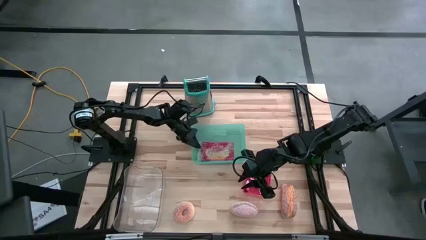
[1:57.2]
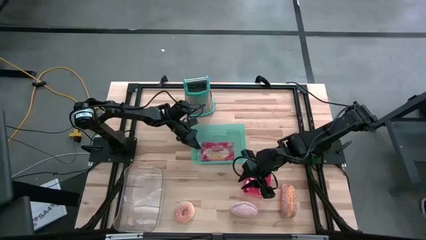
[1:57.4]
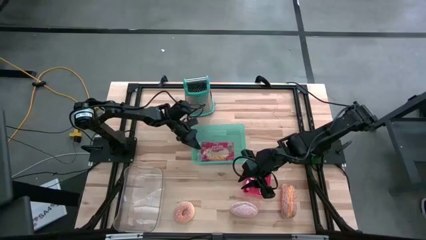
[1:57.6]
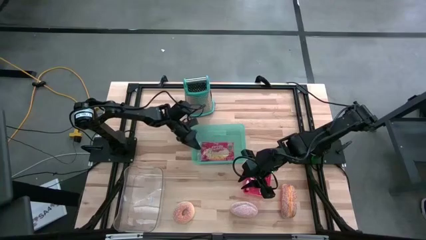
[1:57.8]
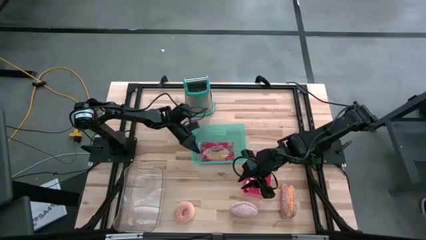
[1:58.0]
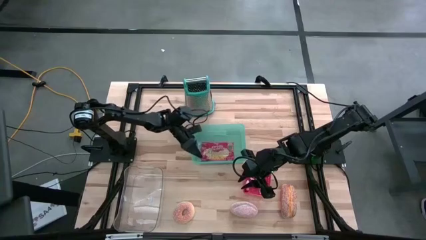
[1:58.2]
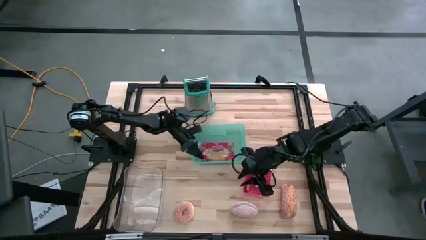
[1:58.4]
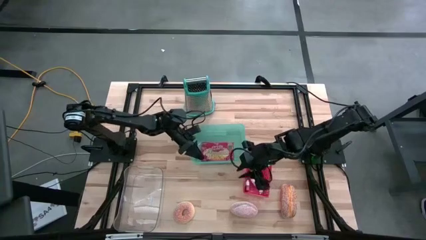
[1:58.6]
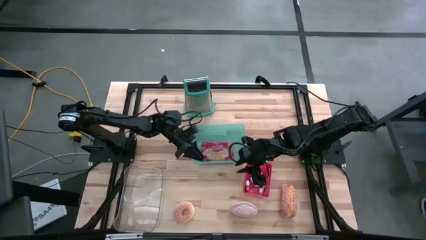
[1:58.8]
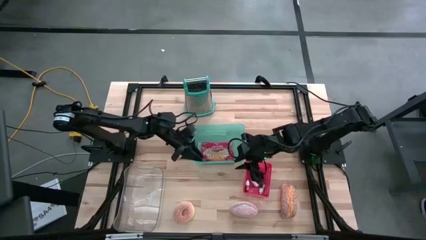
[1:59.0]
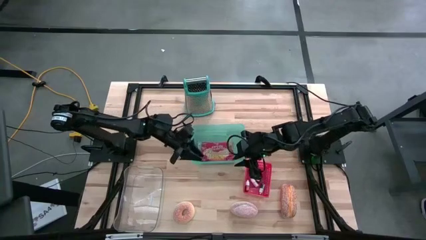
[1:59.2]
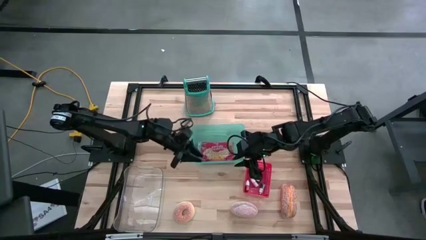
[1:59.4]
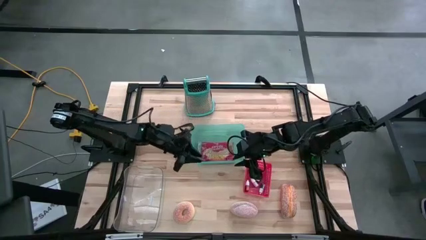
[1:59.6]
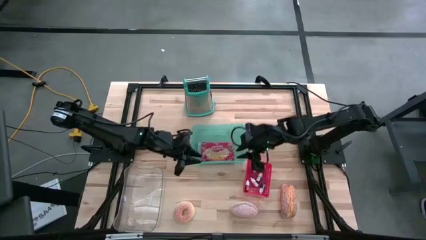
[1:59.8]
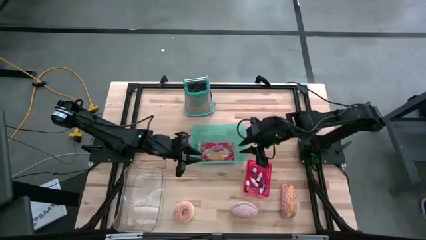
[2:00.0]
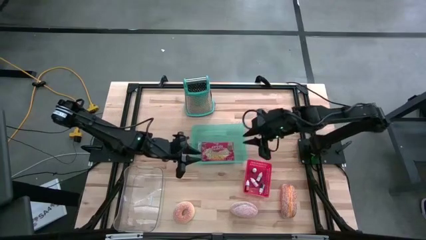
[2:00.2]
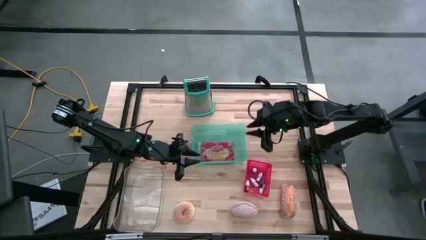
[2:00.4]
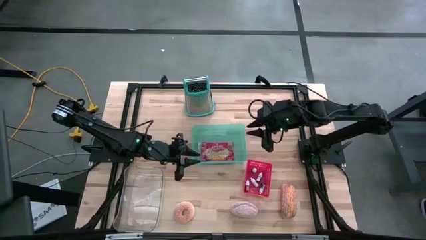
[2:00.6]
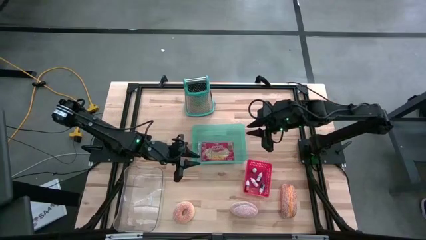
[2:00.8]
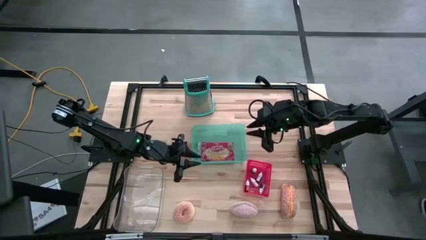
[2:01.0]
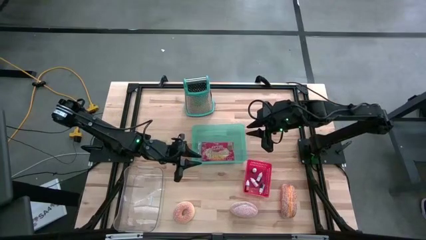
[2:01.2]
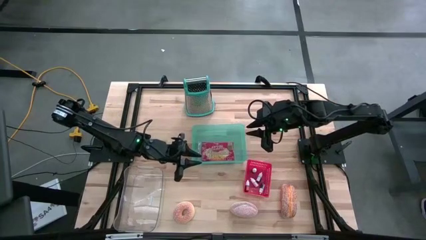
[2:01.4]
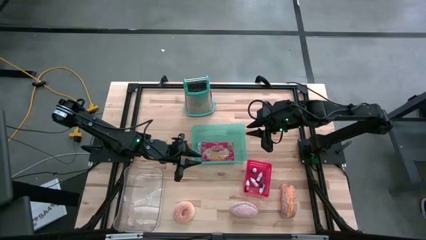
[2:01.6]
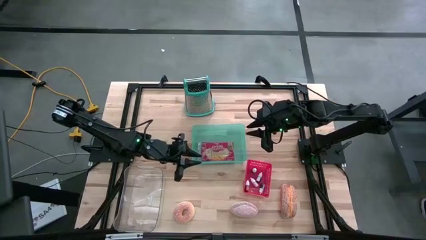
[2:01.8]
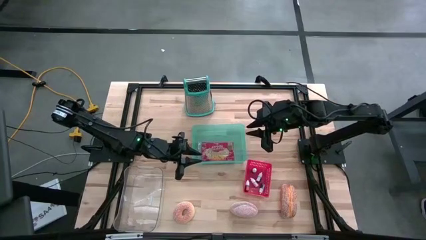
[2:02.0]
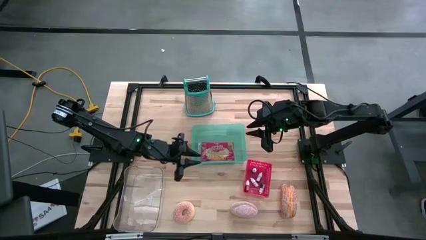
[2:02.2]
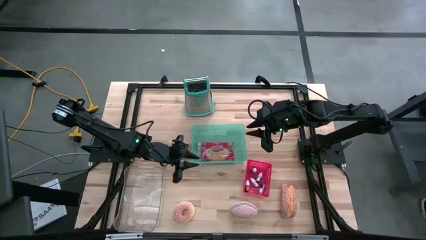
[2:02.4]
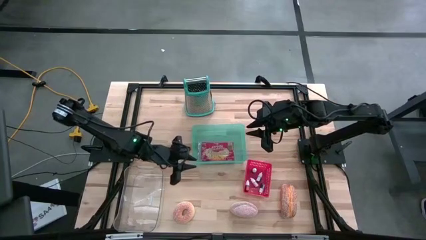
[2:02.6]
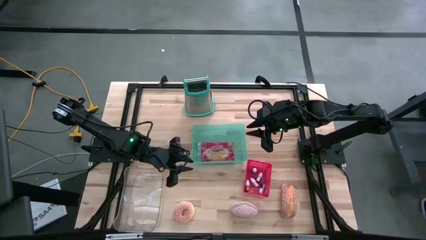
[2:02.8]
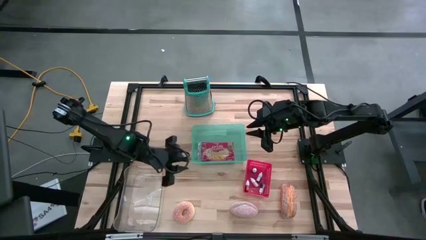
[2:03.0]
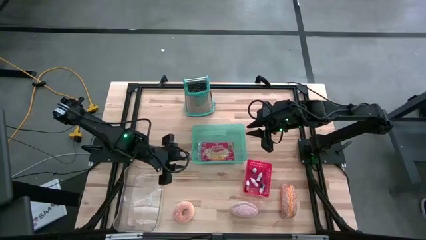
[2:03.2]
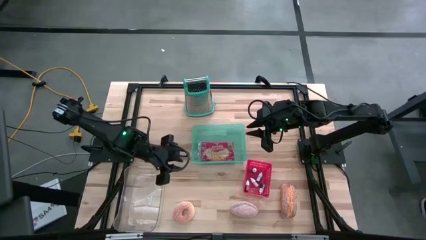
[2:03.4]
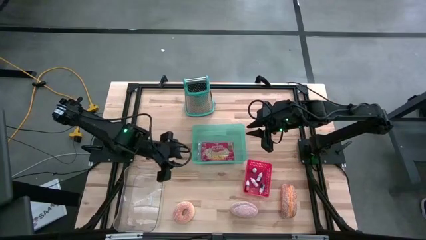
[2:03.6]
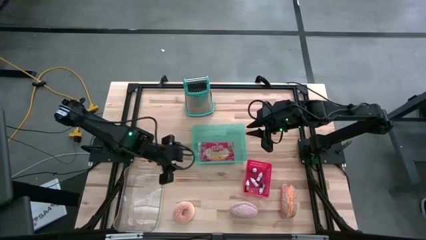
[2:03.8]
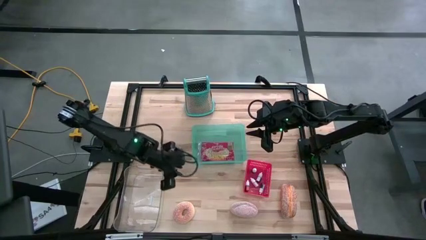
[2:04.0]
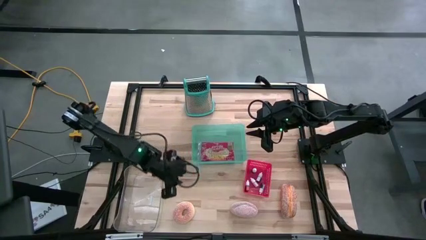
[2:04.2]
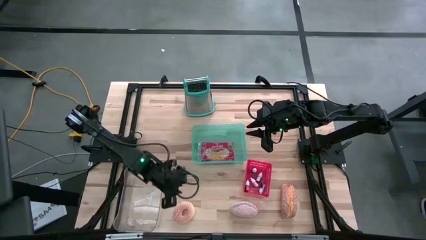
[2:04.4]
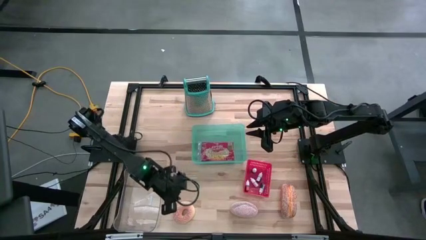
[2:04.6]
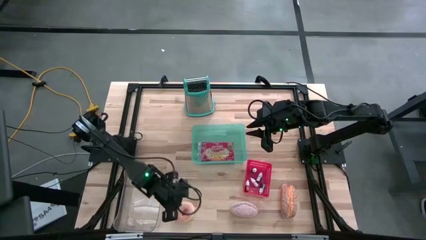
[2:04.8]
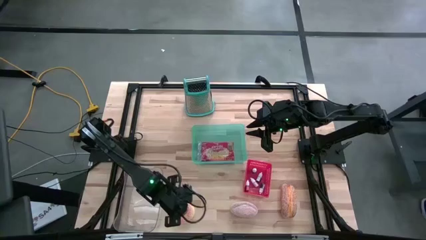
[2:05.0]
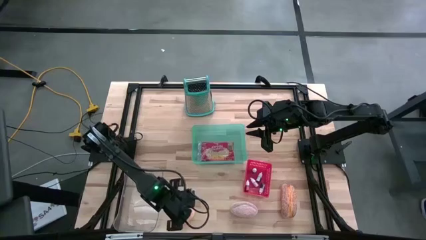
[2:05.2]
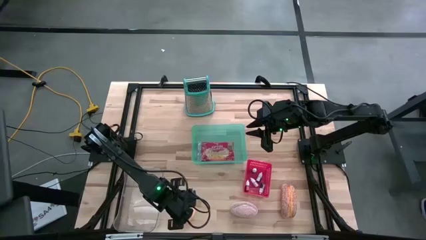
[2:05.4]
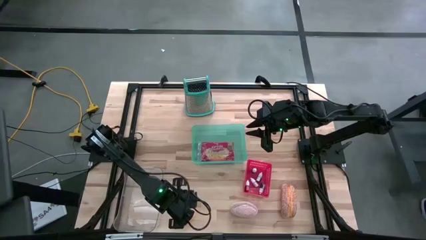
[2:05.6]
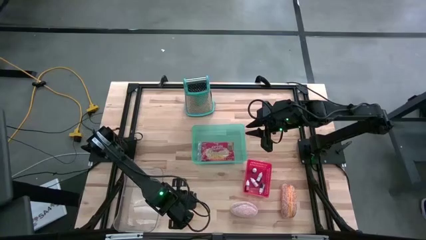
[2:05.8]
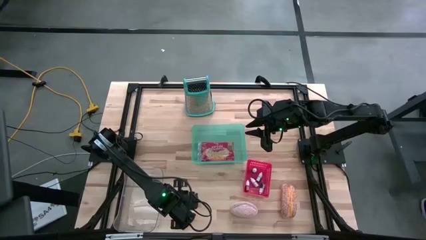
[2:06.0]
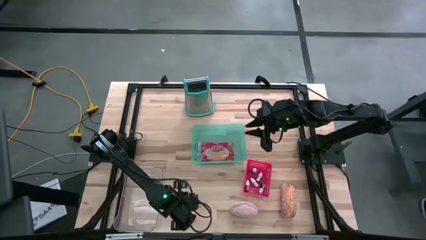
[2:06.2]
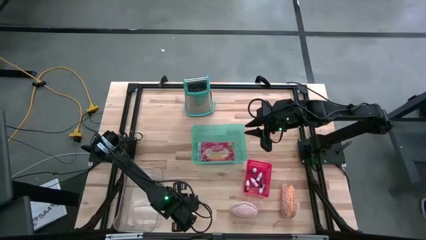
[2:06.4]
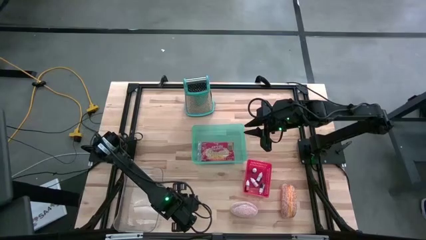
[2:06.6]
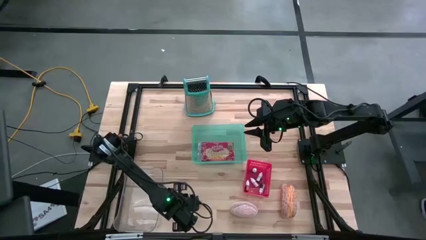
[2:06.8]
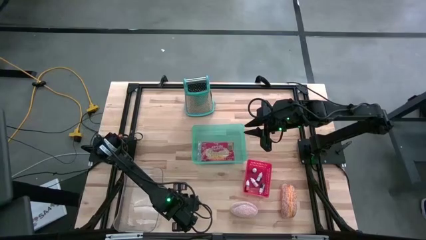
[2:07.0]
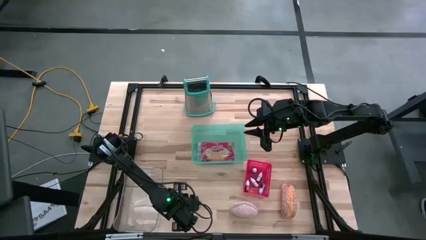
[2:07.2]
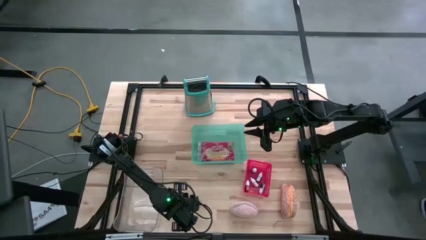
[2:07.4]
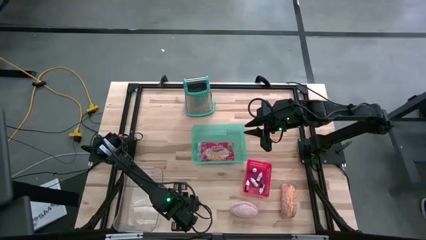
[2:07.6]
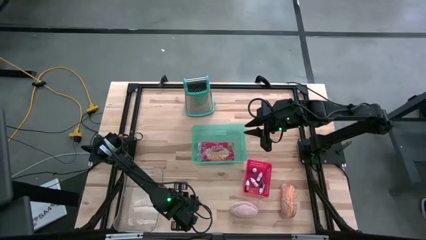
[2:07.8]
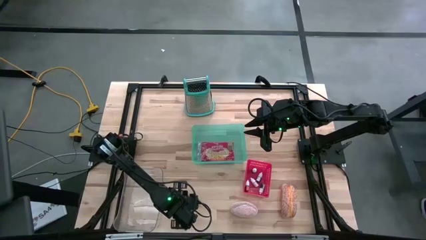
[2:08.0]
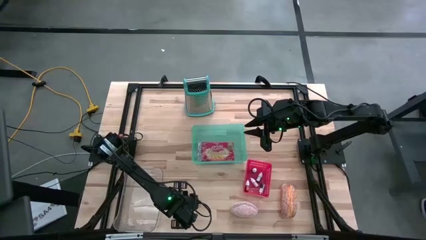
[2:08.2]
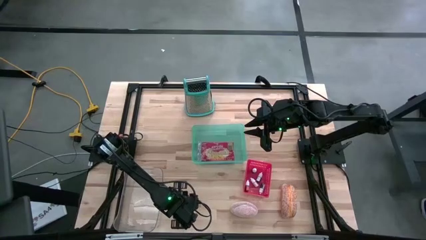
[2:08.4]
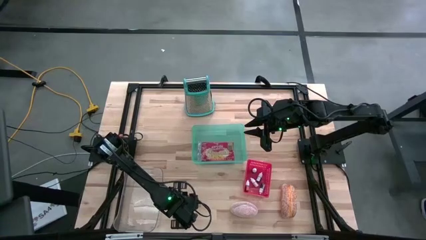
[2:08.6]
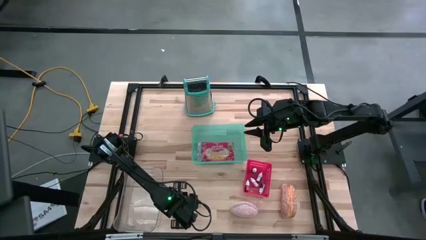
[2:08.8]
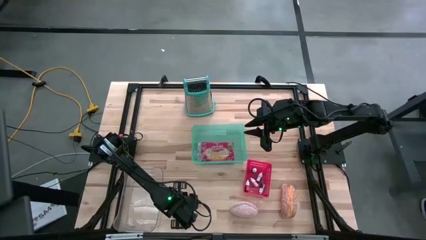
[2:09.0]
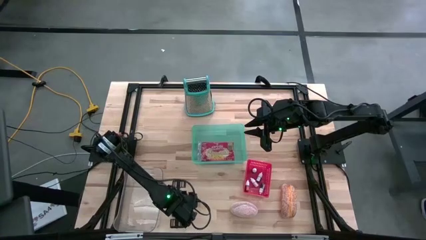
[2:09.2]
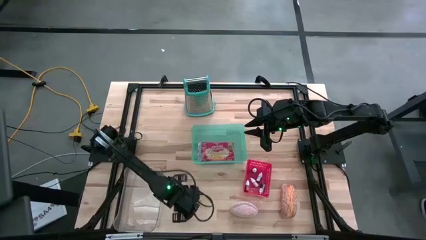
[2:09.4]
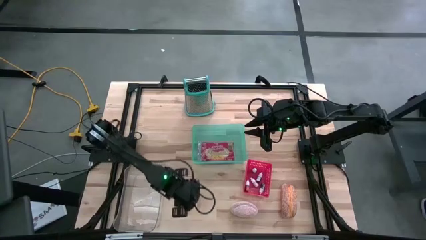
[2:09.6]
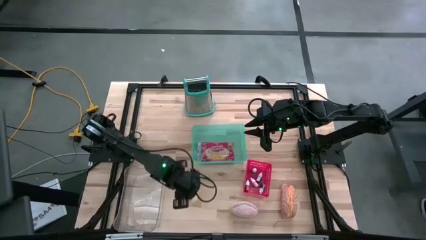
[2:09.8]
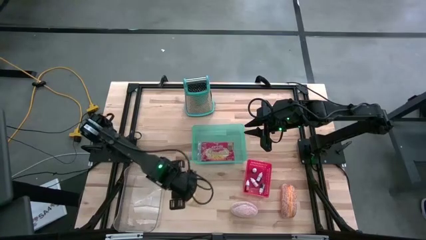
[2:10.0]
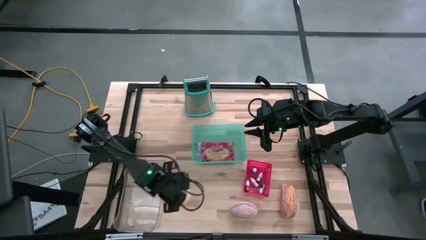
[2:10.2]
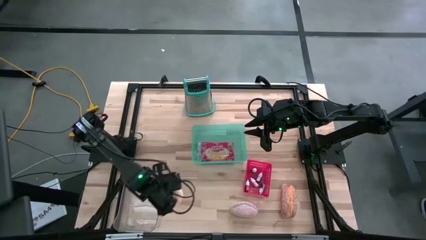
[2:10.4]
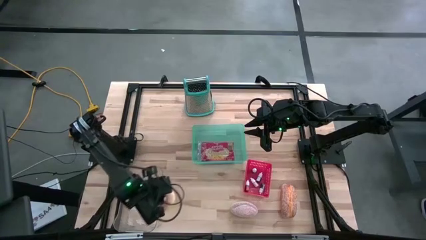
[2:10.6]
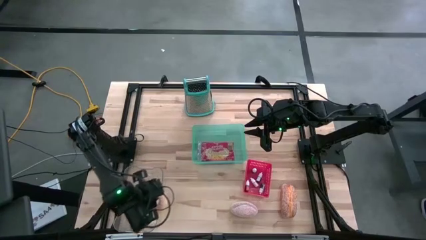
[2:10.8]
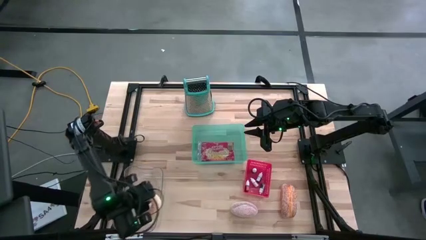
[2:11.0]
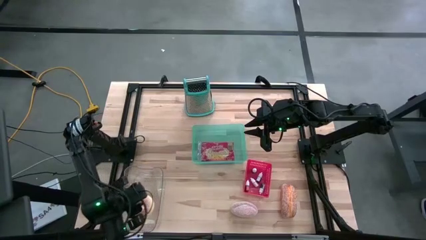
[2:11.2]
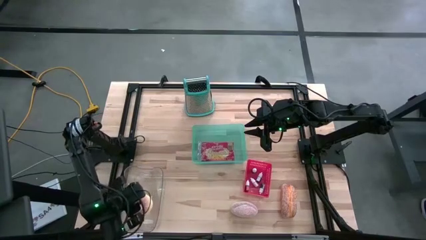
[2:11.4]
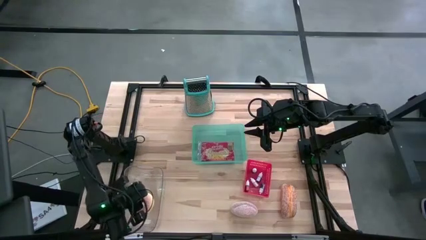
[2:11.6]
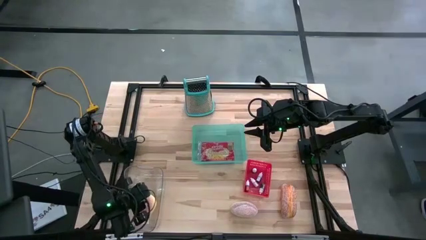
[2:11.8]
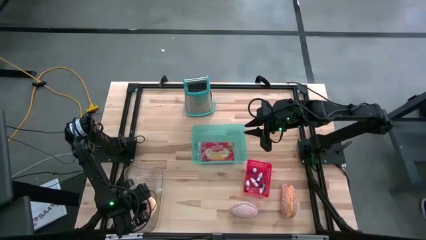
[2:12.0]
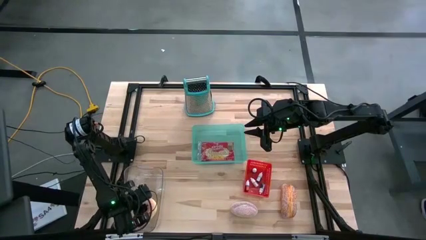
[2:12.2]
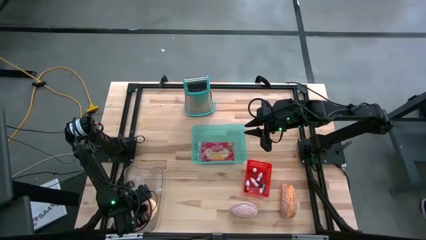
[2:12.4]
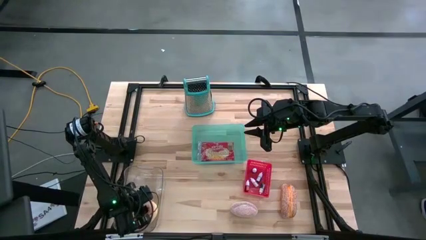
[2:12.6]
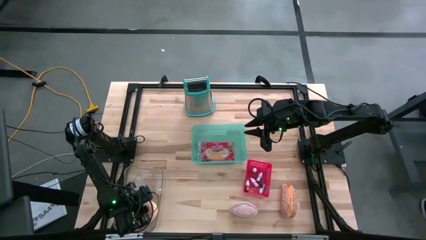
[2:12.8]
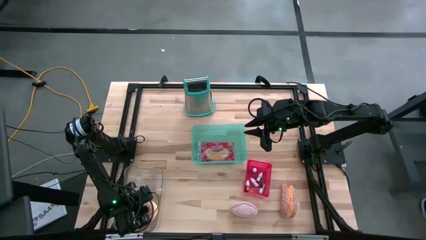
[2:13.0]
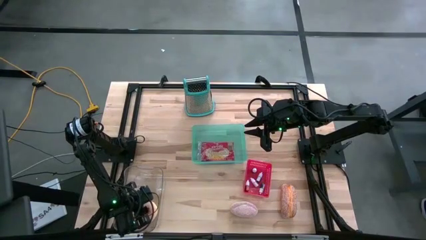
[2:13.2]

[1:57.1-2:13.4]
Task: Pick & Place Food Item
Put the doughnut into the transparent bin
